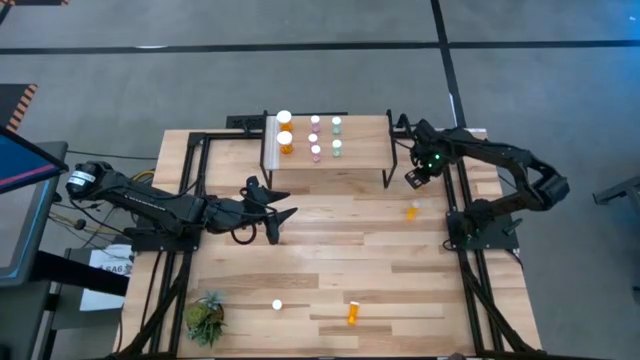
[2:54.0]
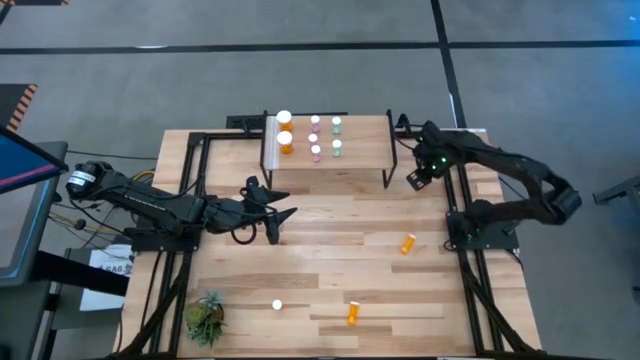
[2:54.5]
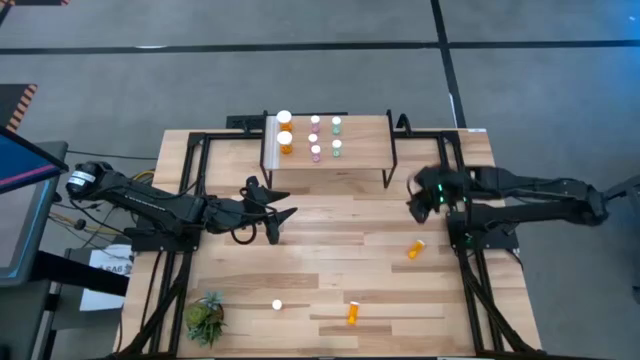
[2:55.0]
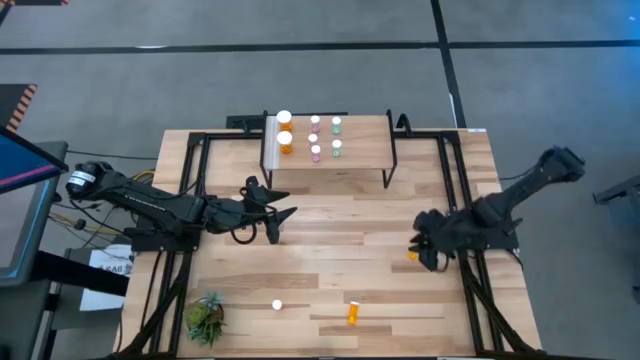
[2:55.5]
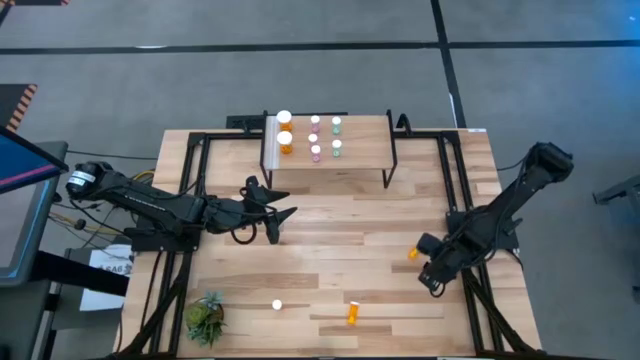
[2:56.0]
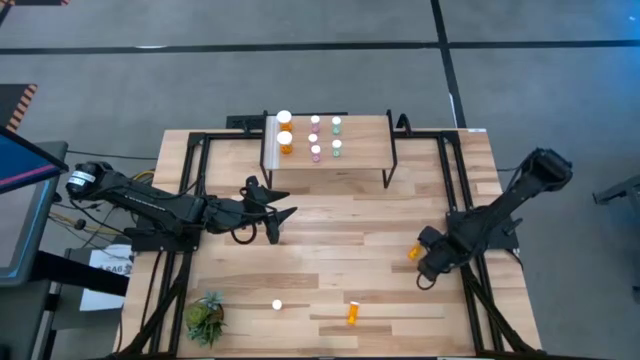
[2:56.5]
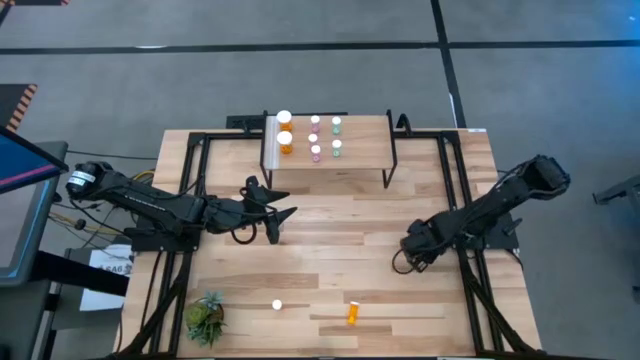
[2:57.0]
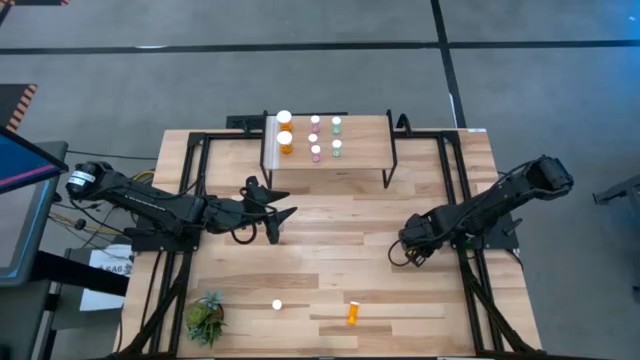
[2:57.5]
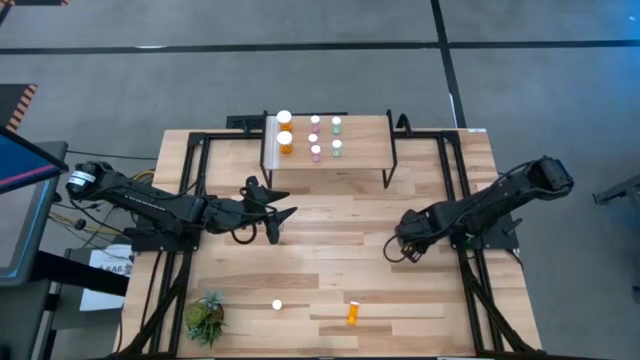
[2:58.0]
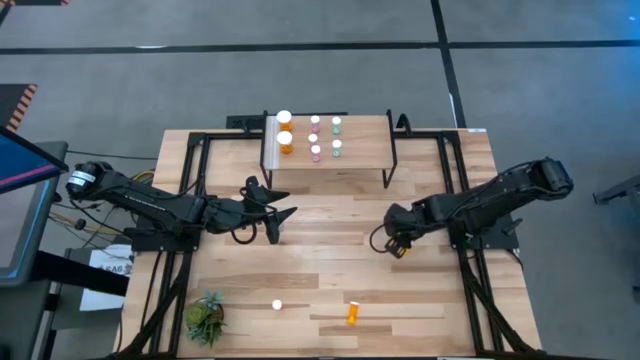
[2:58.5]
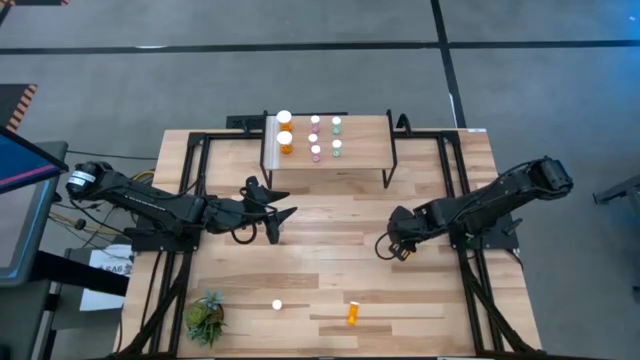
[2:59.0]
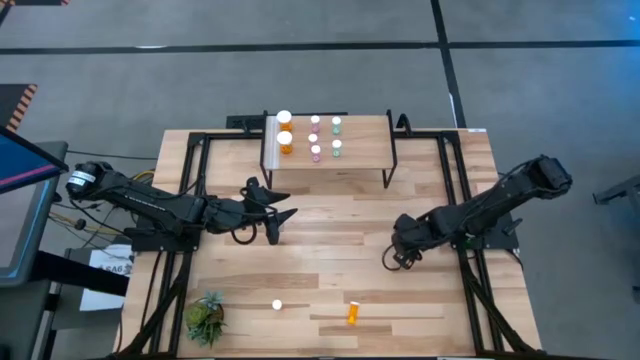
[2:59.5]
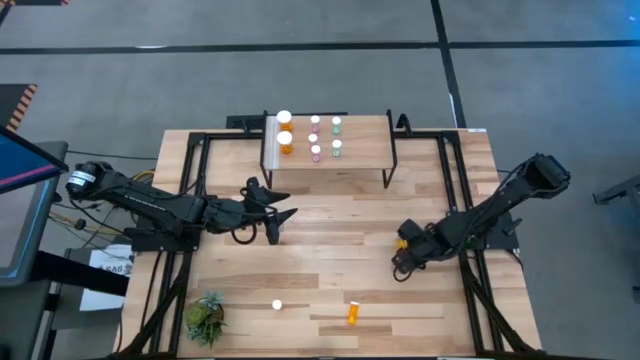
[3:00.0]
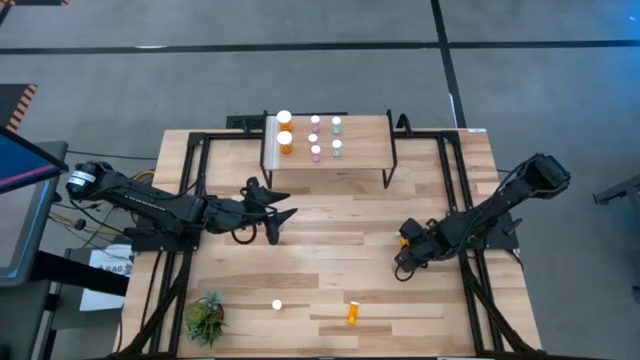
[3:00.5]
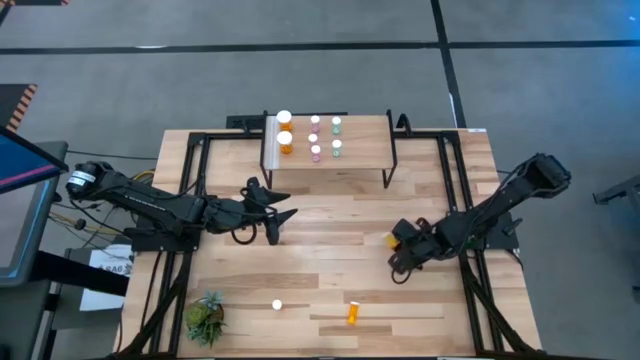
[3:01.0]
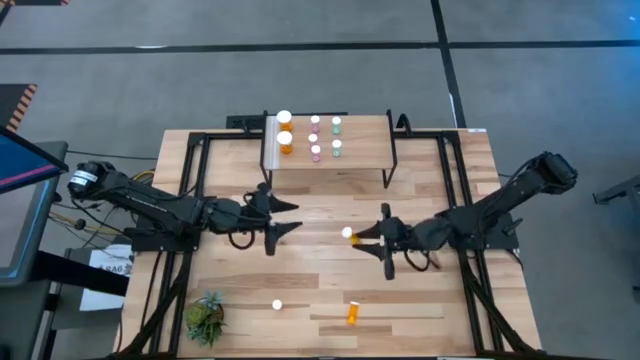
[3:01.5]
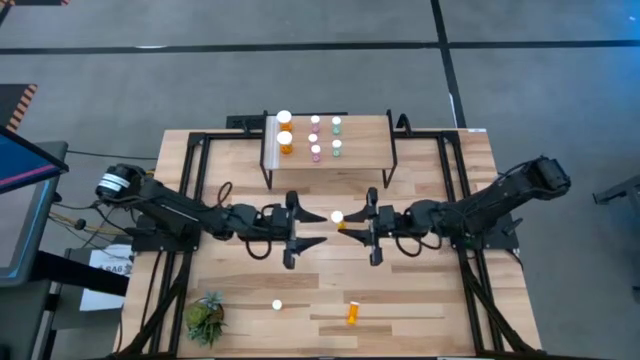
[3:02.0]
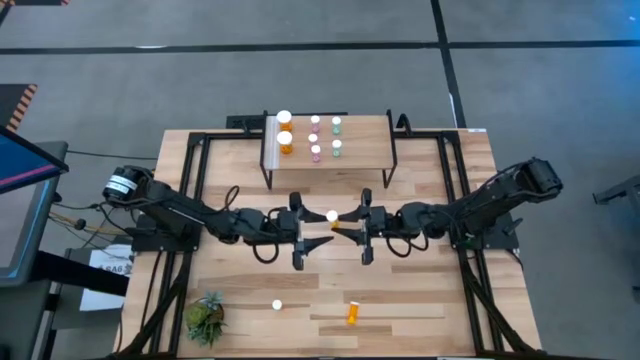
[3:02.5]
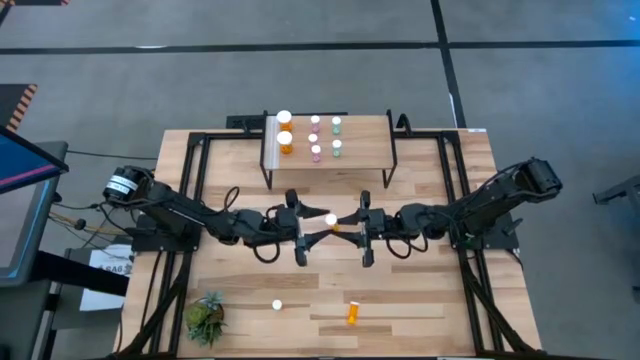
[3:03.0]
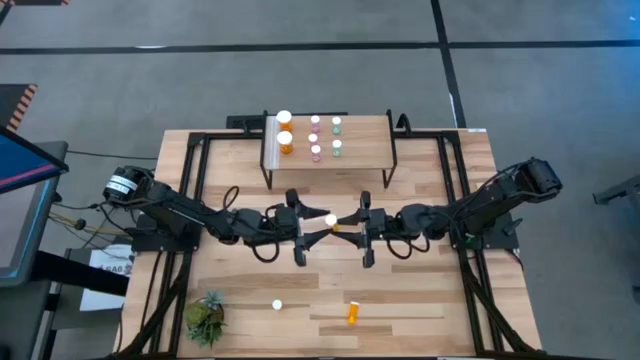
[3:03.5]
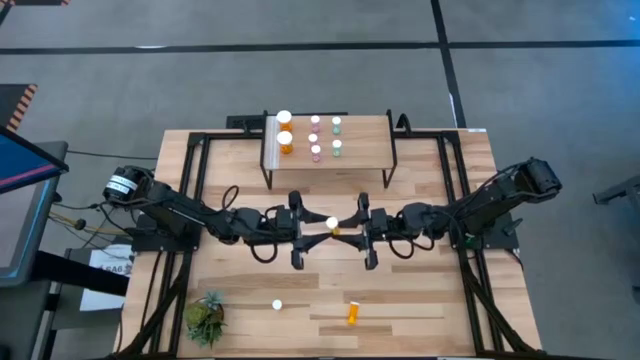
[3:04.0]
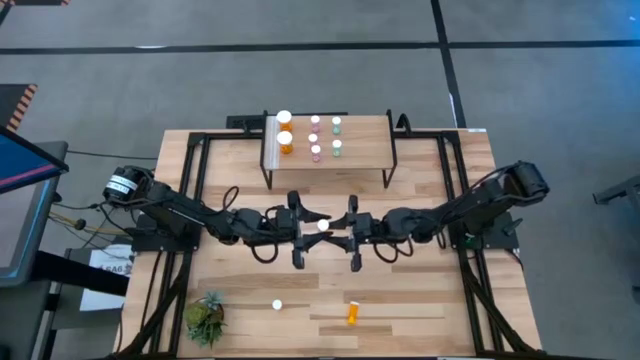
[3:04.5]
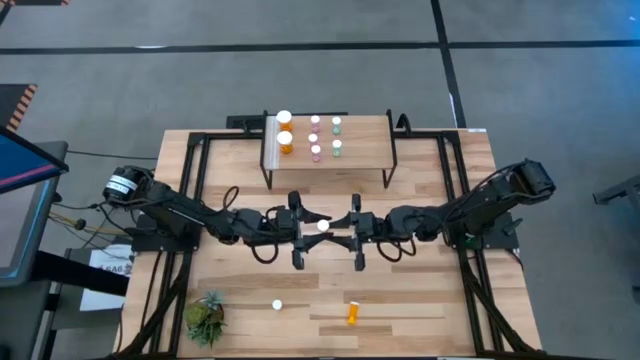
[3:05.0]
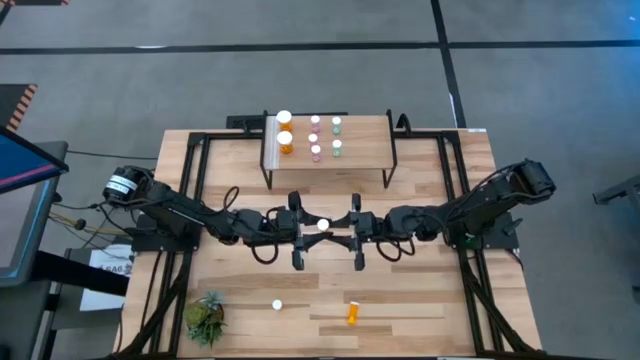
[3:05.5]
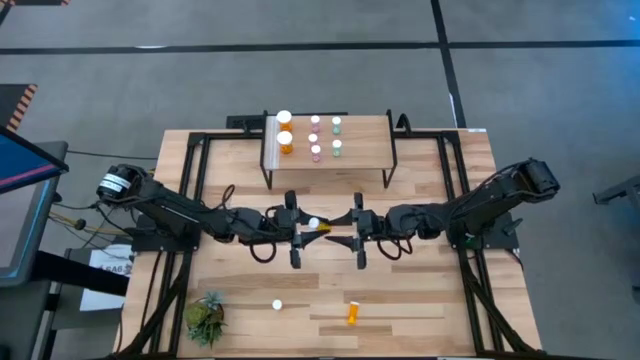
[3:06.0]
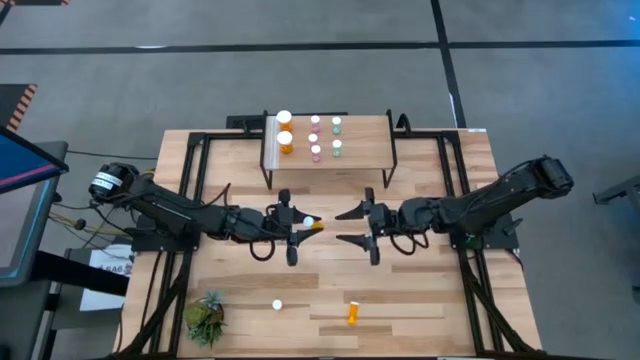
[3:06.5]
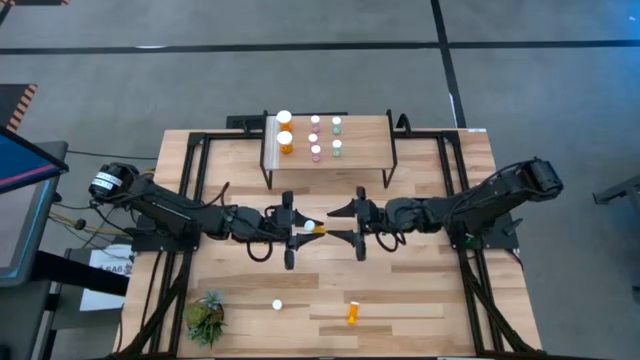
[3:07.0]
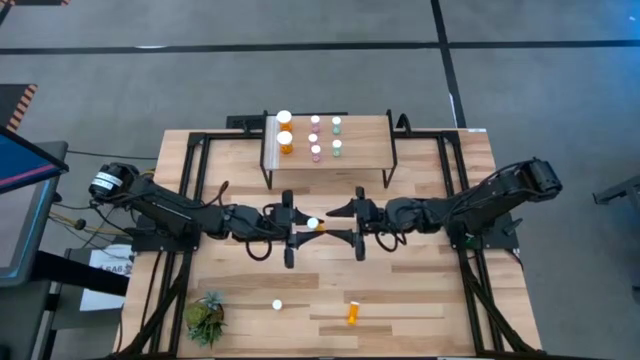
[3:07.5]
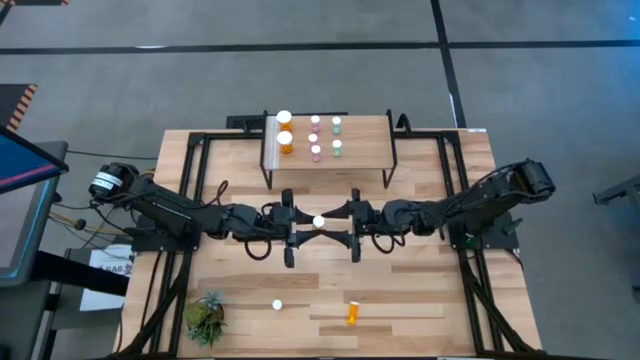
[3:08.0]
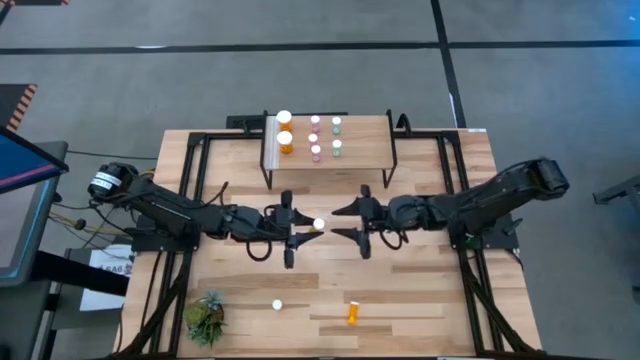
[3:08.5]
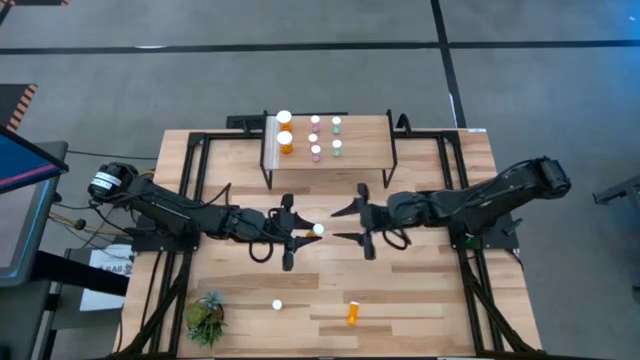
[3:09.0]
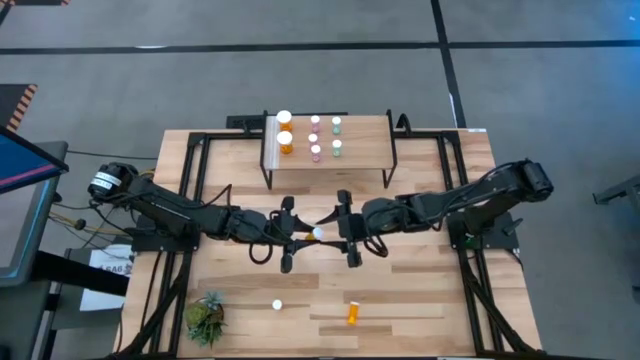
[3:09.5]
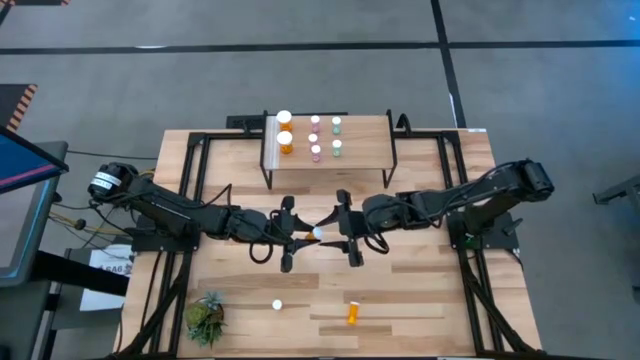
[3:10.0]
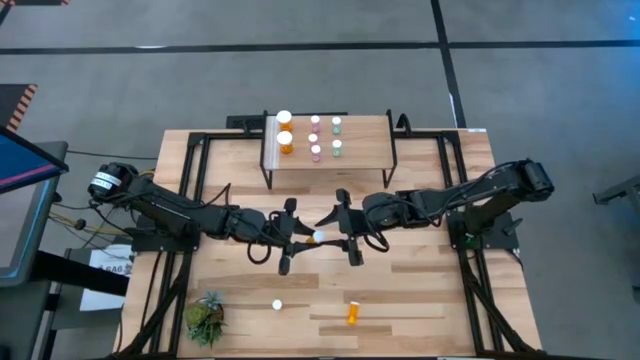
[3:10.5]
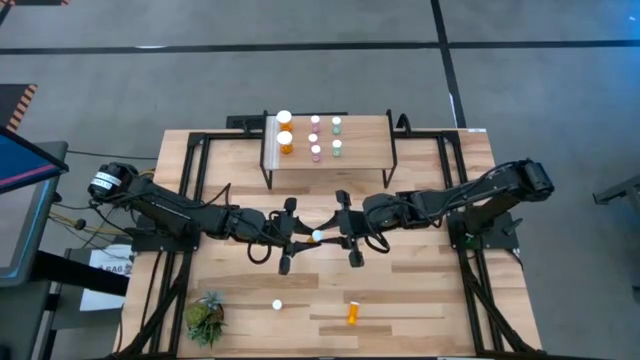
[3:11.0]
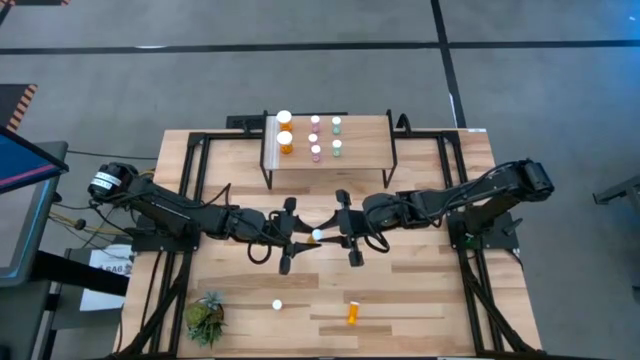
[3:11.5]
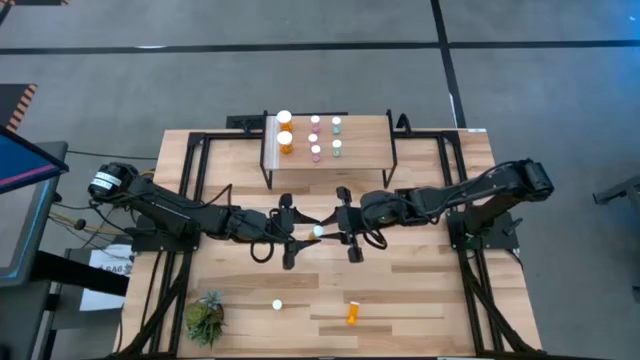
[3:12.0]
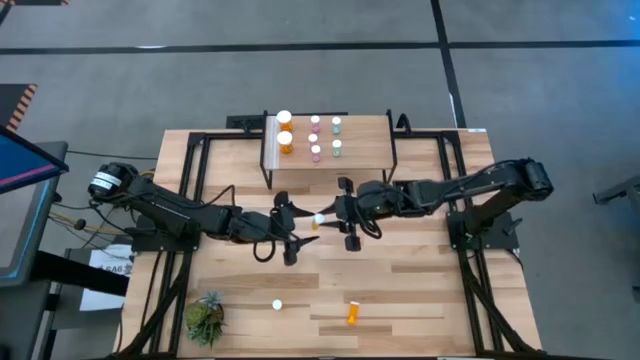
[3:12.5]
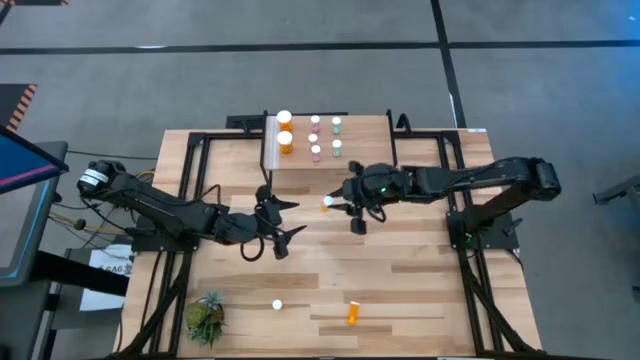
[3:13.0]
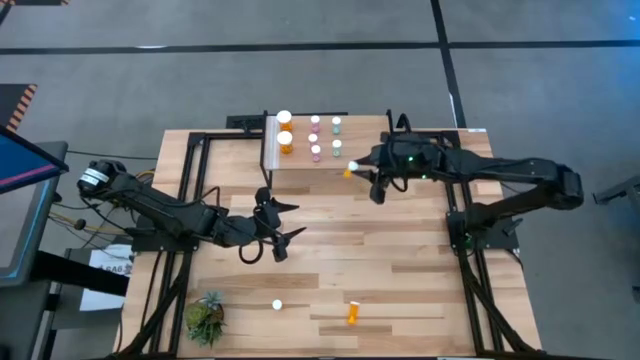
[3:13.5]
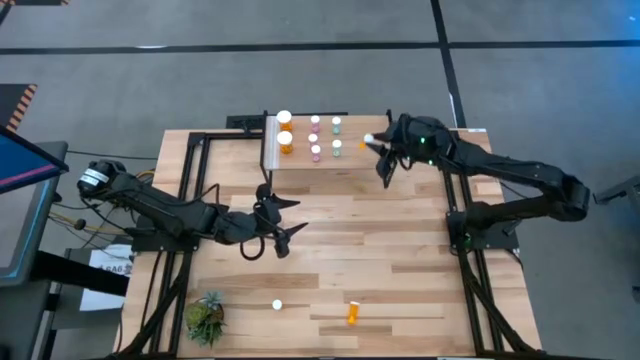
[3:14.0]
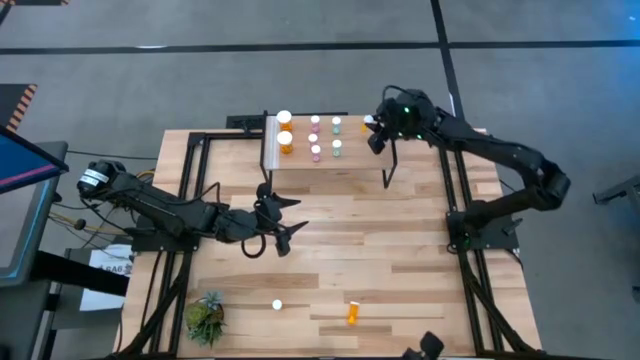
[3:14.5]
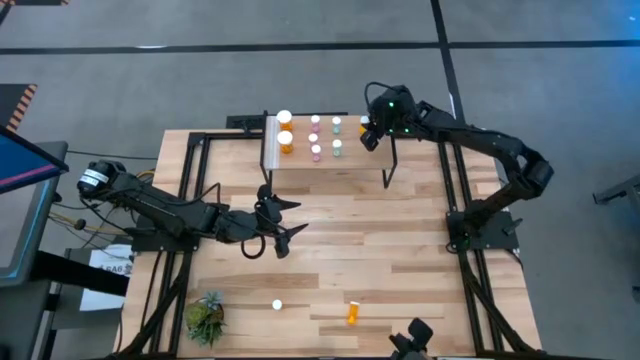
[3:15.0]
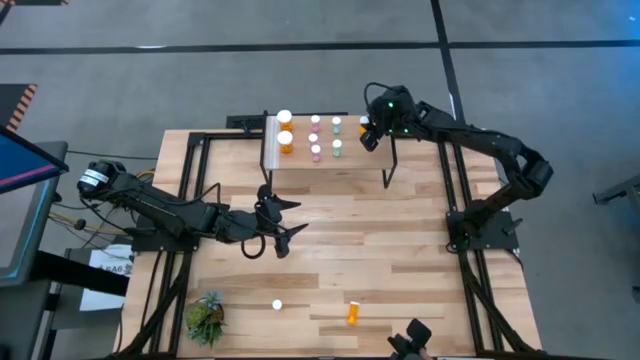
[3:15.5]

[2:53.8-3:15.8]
Task: Pick and place medicine bottles onto shelf by color
Put the top orange pill bottle on the shelf
